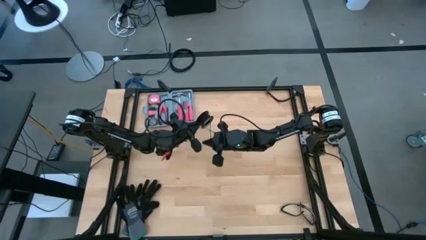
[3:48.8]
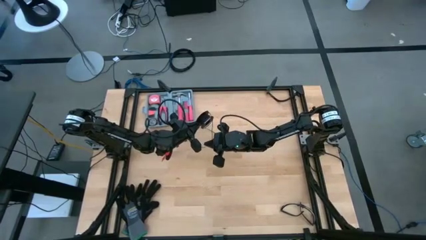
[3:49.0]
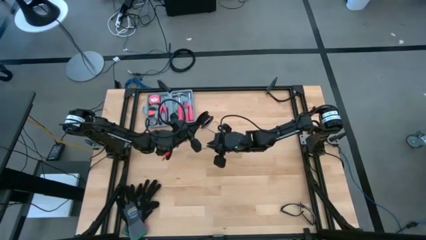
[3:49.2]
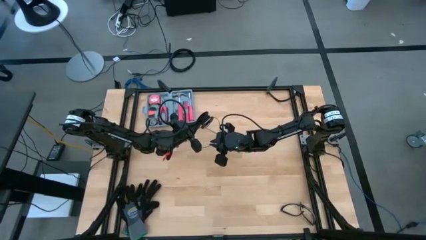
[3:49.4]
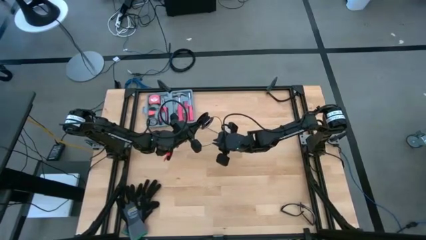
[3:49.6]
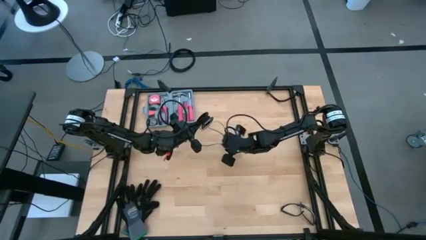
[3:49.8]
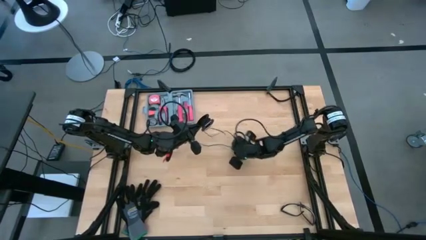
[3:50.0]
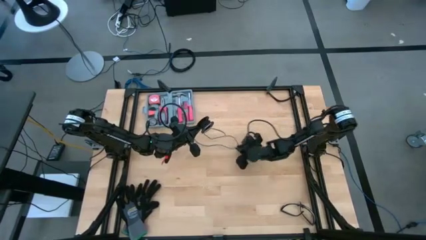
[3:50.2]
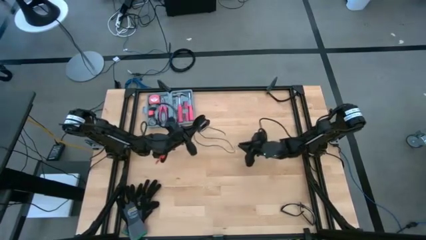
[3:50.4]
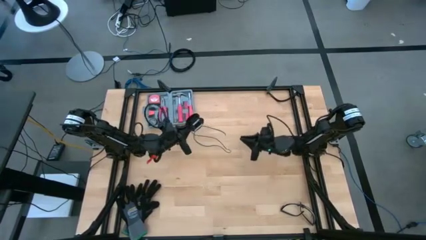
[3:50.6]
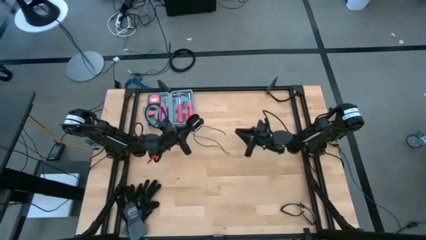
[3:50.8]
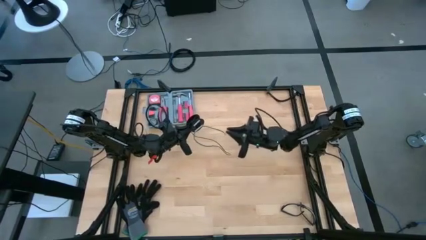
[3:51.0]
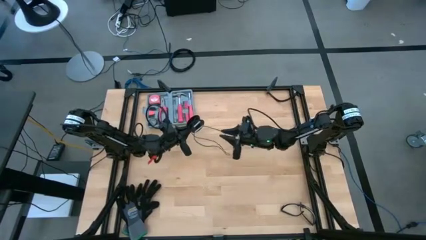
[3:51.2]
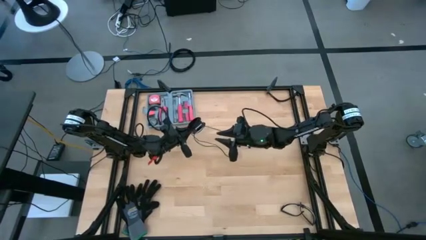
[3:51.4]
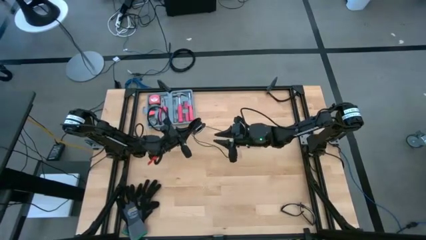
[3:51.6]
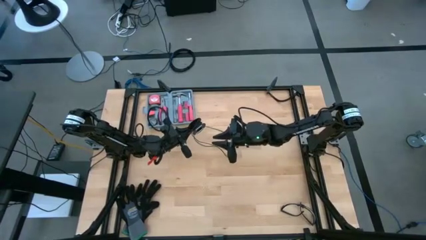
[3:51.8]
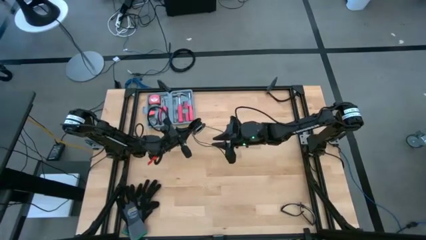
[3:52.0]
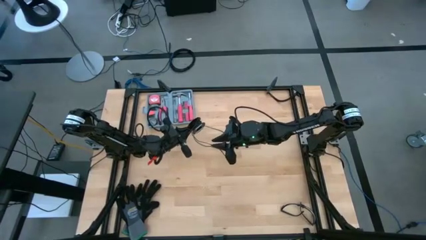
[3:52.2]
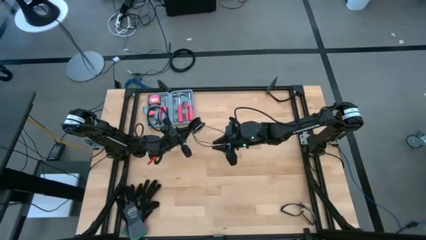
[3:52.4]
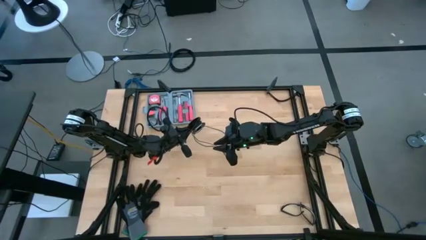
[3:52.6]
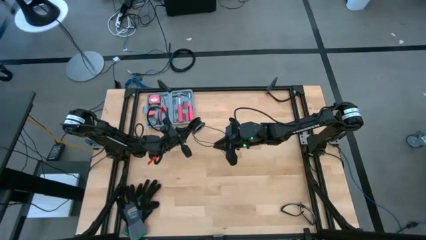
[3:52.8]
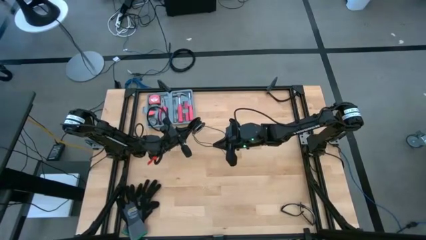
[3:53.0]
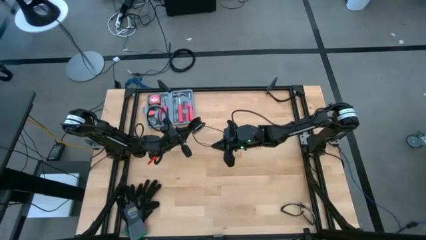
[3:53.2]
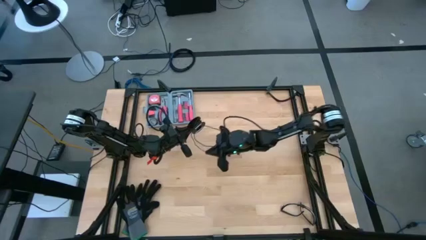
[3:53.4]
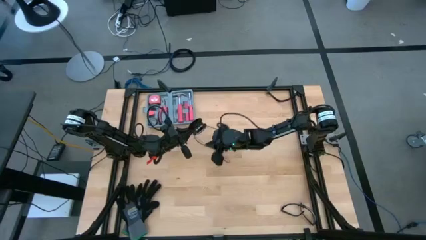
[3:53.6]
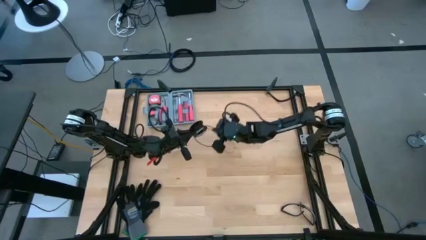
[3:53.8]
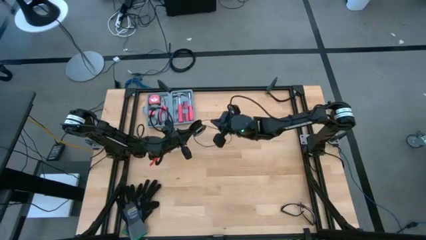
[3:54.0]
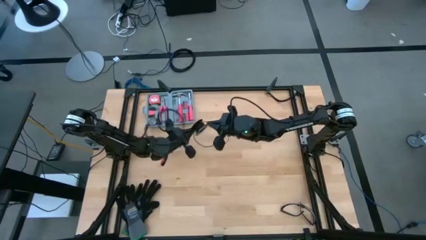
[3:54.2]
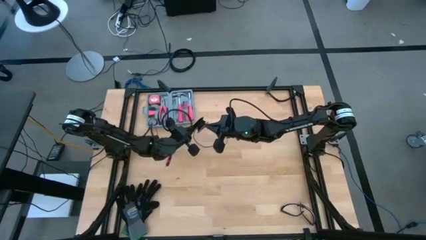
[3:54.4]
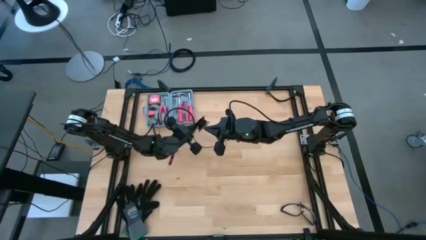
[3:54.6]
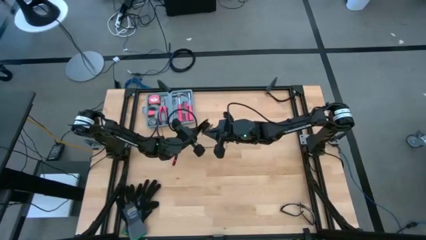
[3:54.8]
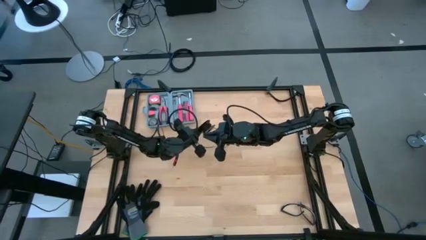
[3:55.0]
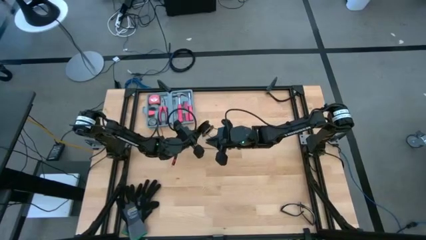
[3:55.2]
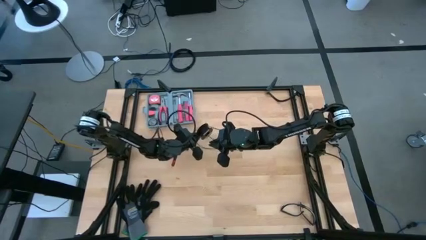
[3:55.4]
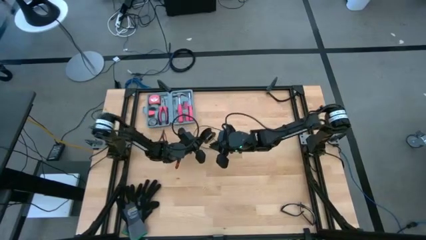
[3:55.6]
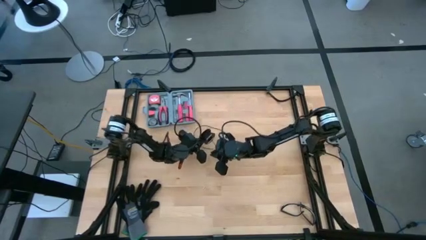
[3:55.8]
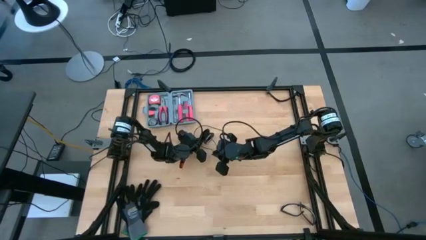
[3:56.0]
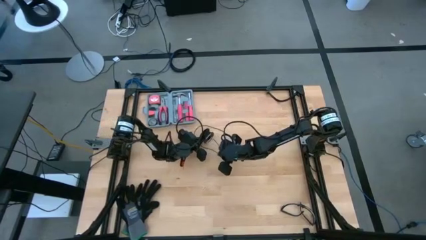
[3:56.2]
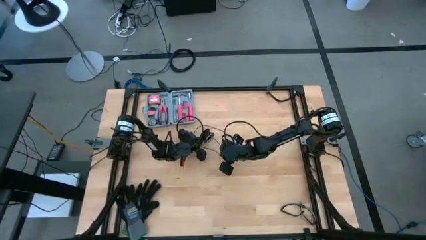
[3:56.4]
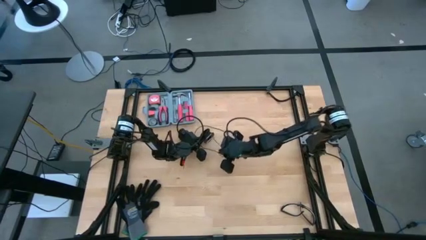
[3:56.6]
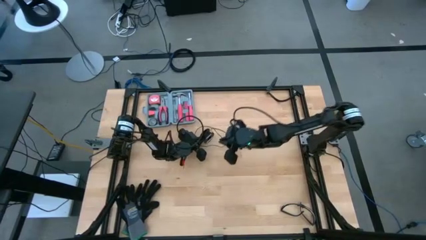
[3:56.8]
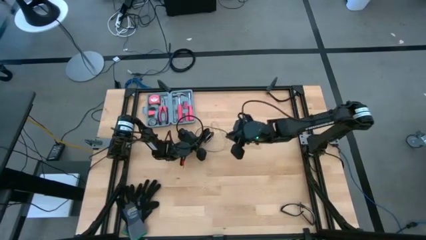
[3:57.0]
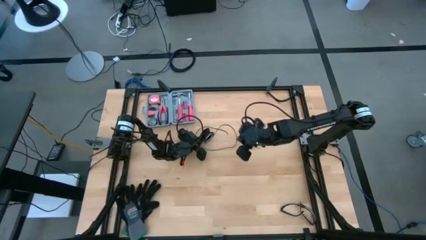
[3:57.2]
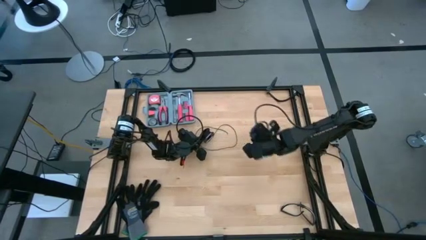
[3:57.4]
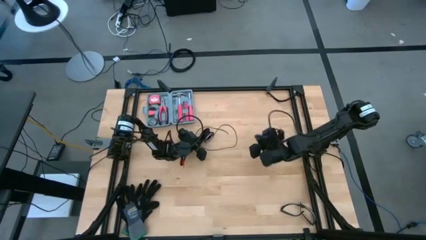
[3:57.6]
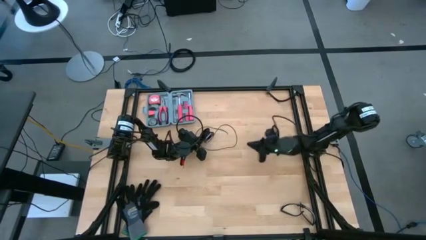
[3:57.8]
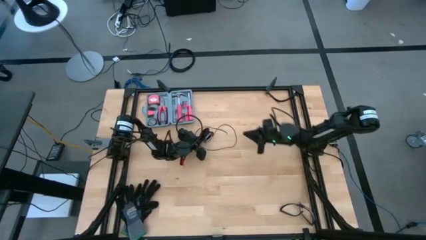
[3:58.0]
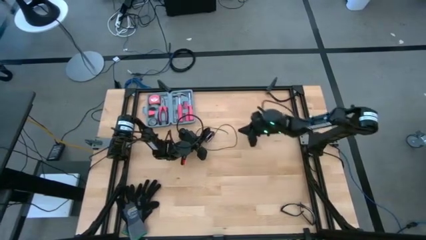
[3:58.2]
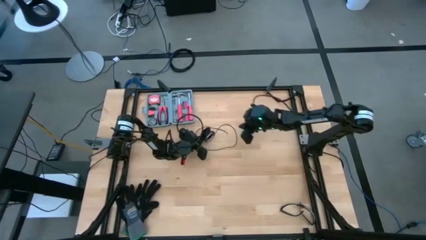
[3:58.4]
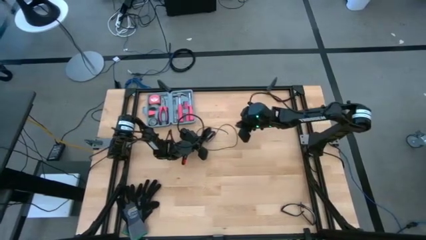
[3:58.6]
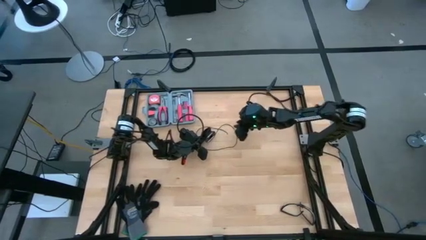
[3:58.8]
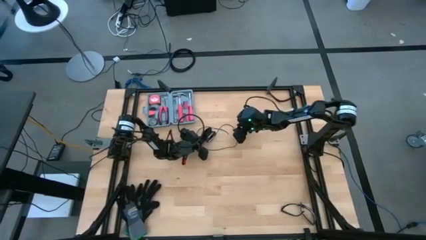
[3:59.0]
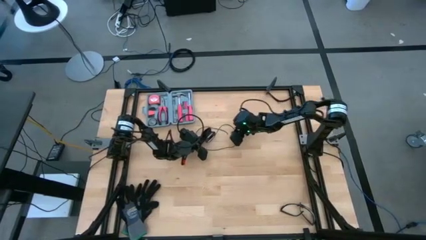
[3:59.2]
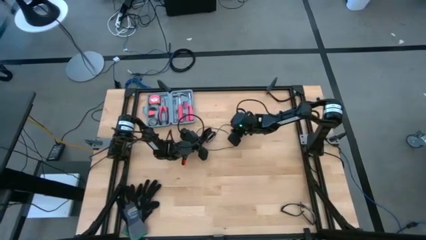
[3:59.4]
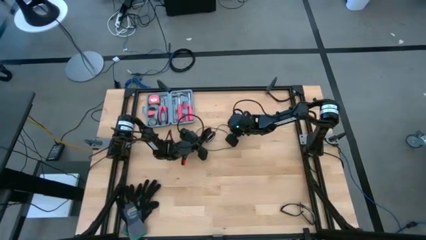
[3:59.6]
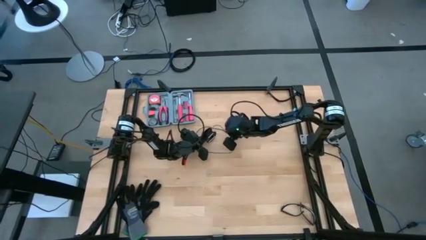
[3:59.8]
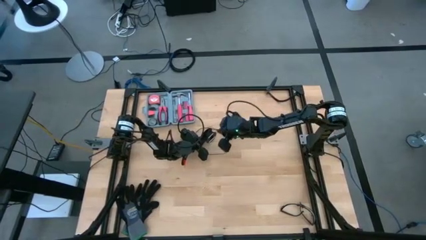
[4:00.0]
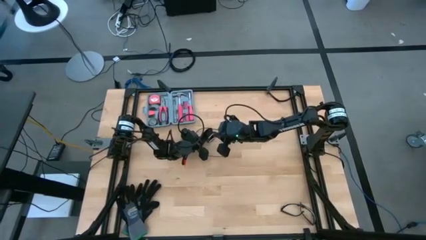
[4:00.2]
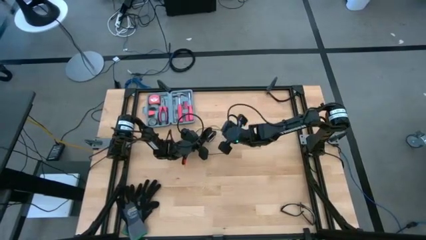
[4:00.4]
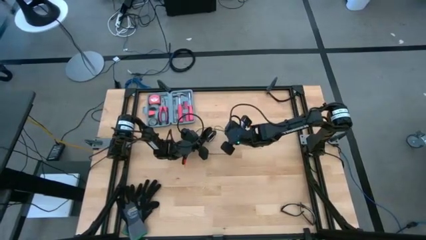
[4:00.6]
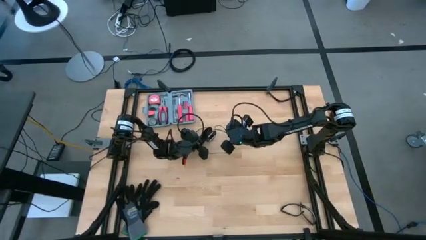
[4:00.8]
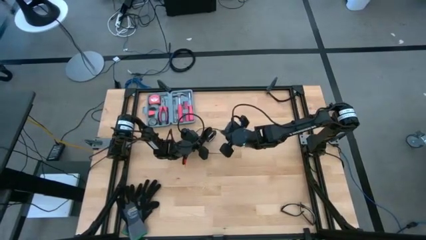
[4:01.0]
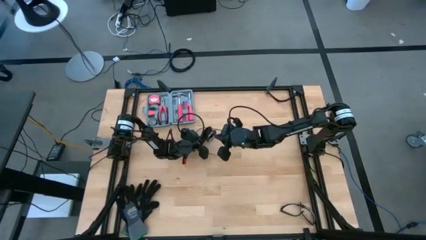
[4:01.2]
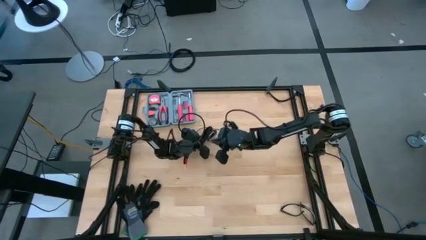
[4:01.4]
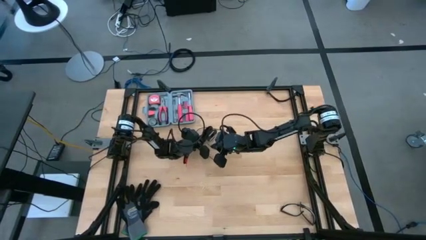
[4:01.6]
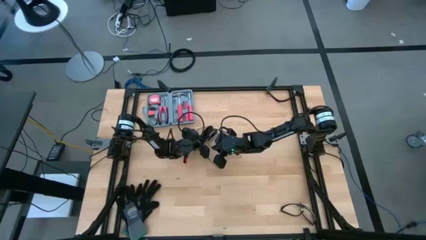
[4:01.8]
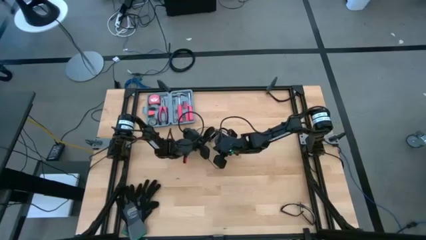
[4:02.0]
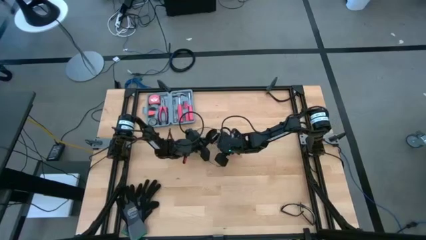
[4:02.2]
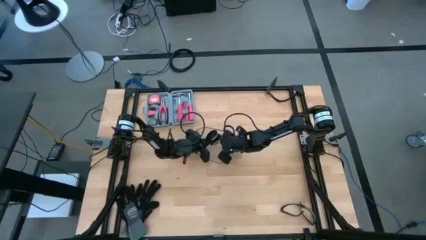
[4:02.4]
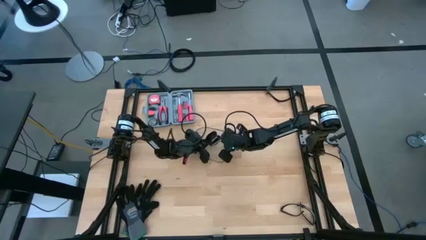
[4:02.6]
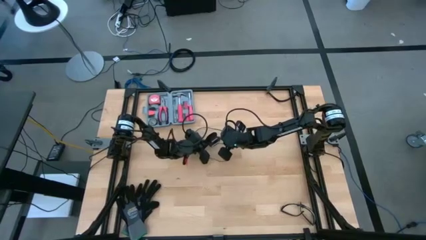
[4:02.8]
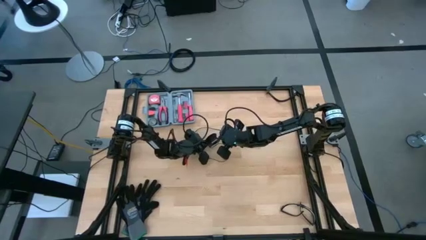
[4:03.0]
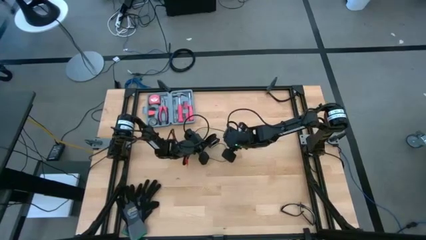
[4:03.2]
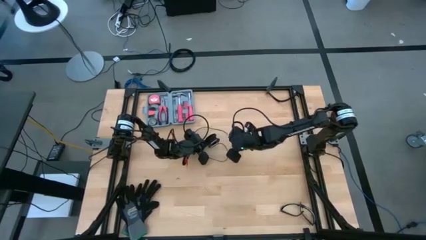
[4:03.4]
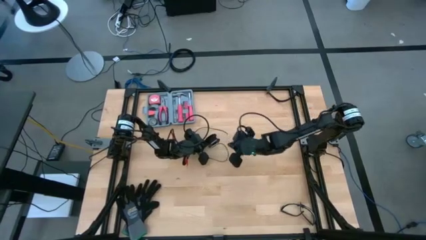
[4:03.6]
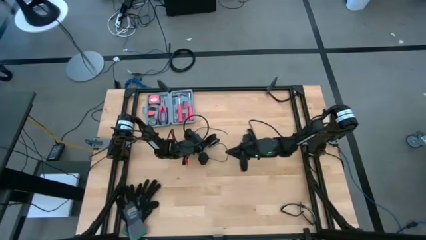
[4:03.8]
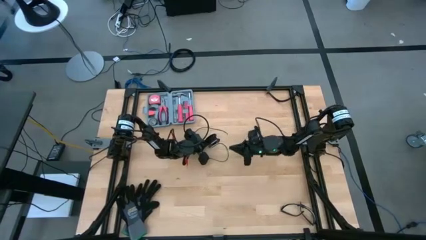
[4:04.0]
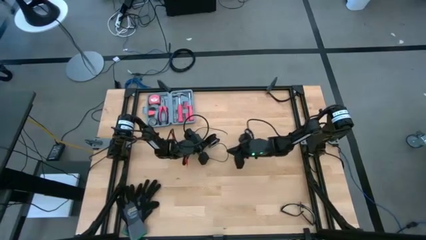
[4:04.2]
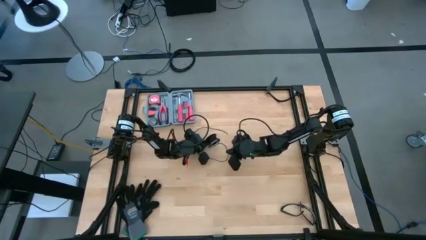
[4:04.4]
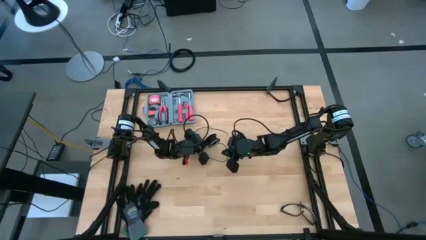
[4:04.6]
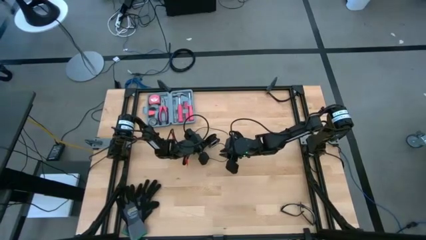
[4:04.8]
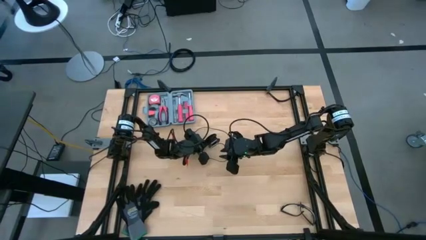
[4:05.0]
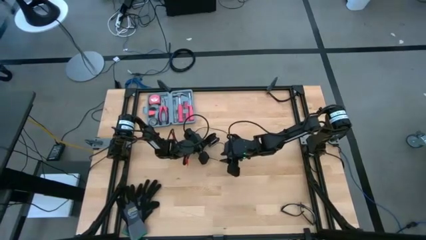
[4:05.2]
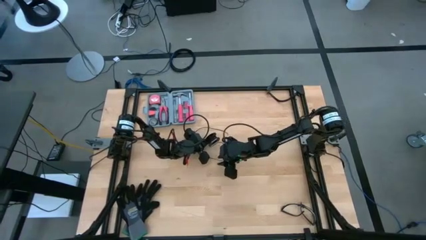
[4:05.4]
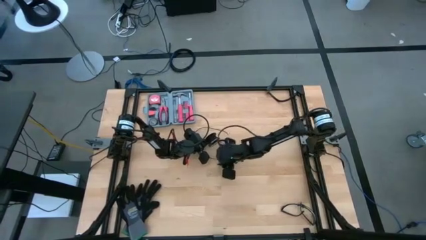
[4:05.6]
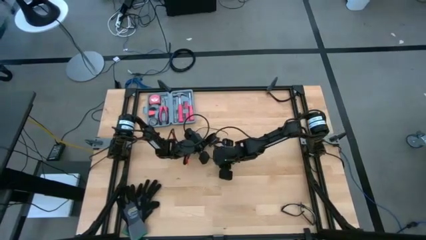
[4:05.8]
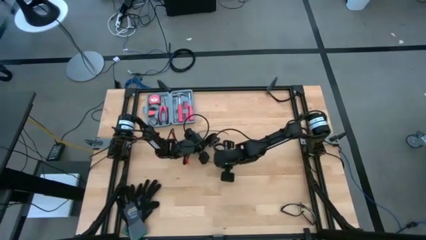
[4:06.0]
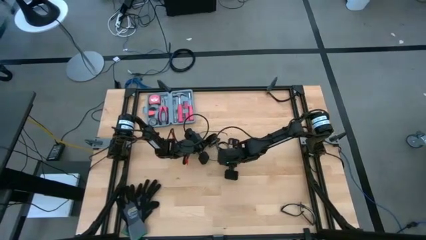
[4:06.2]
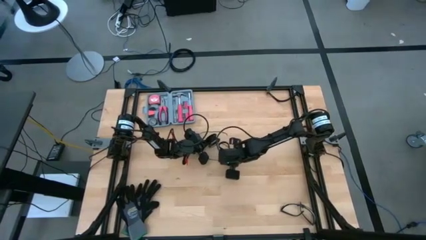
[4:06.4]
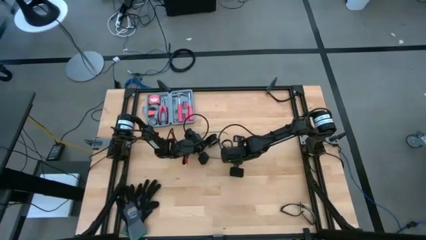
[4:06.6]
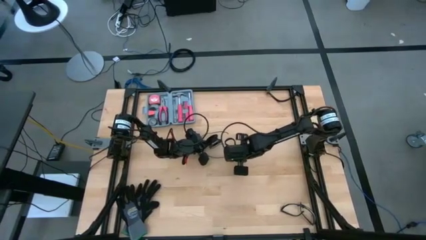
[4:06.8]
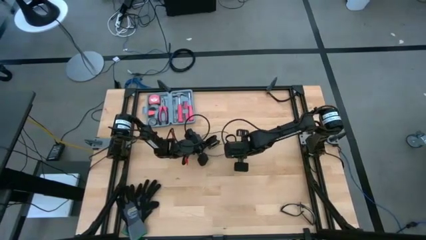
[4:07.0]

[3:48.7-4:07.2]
Task: Coil cords
Coil the black wire onto the spool
